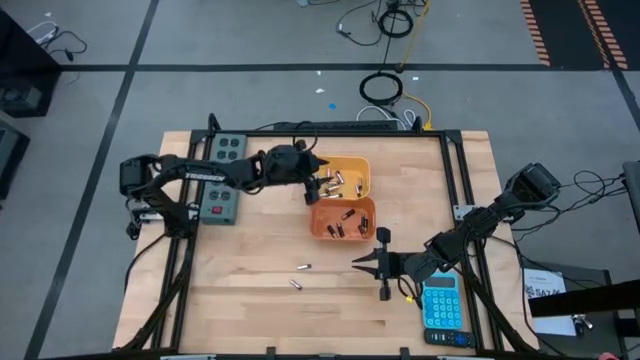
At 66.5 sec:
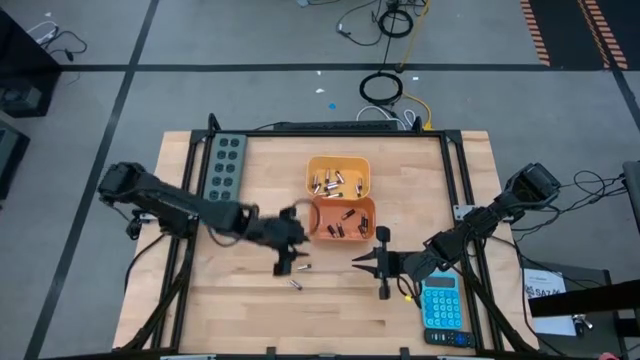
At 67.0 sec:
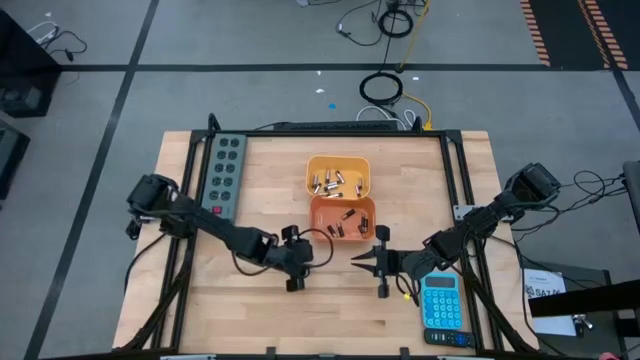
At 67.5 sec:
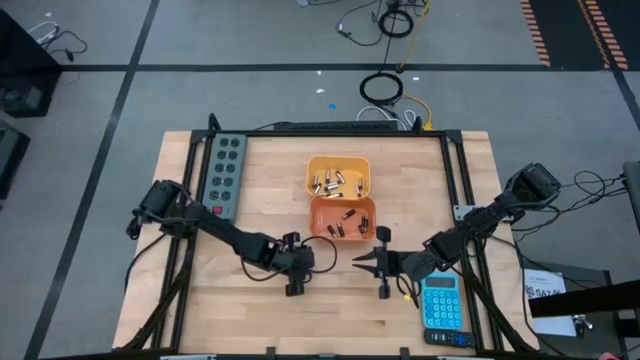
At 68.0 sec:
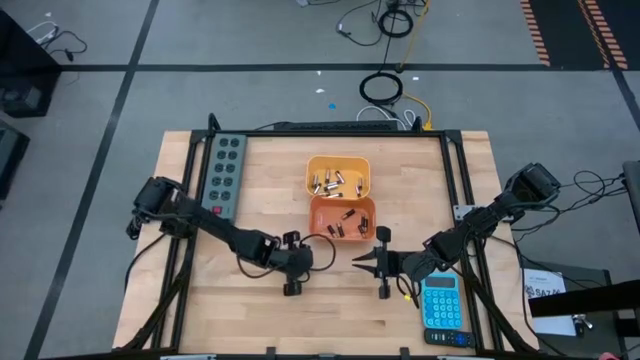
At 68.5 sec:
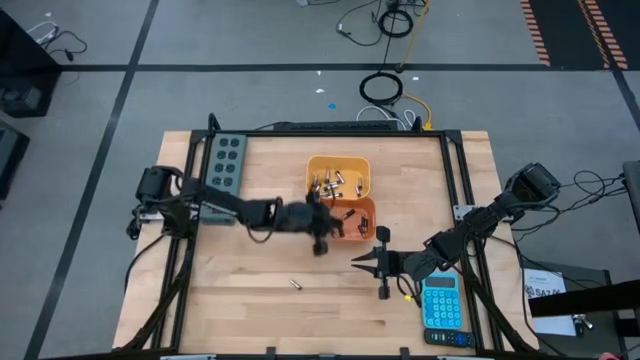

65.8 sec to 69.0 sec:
Task: Sort batteries
Put the silver battery into the yellow bin

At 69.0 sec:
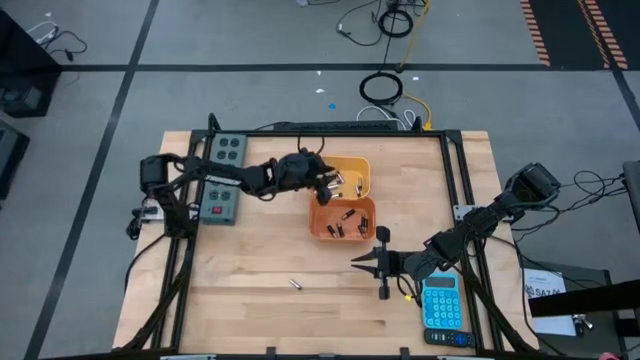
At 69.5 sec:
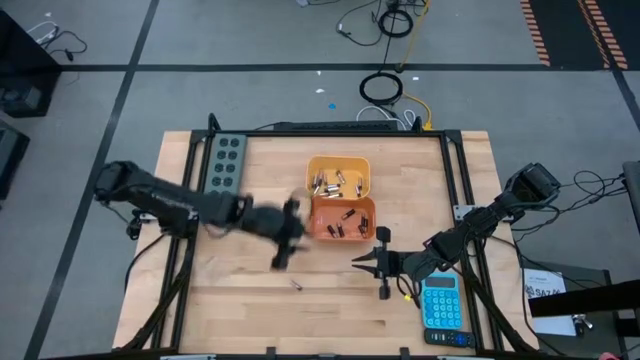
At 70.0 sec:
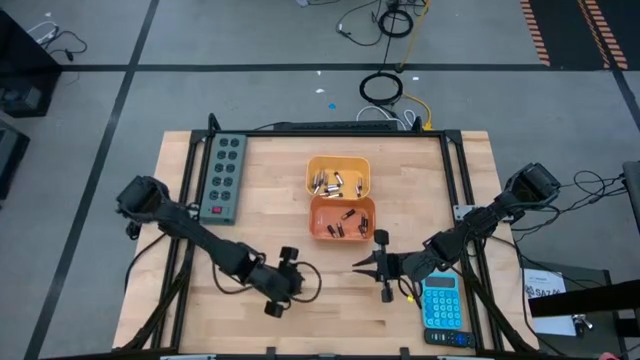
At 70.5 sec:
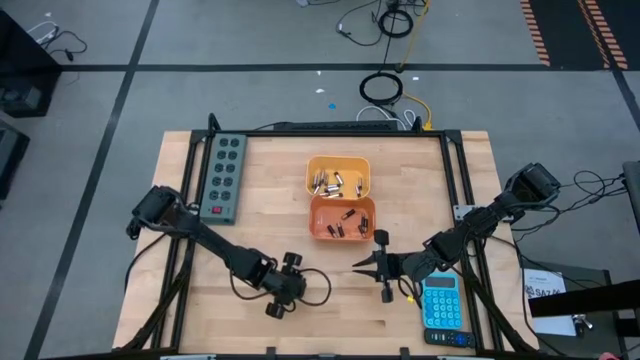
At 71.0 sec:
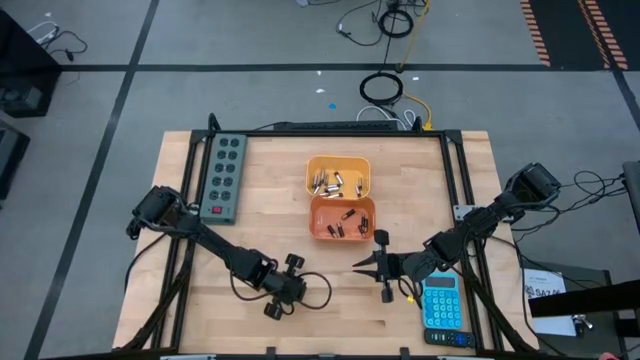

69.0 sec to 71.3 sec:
Put the silver battery into the yellow bin

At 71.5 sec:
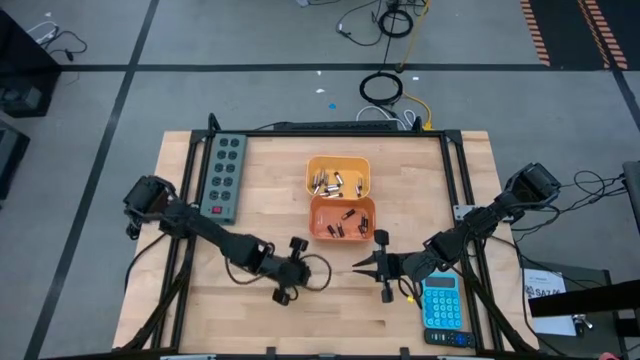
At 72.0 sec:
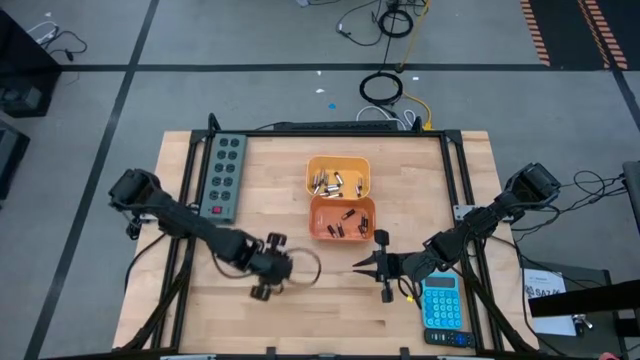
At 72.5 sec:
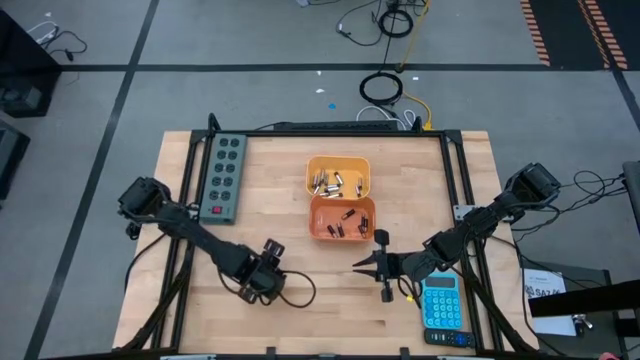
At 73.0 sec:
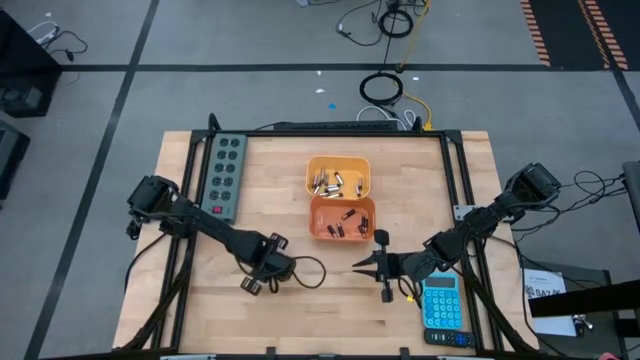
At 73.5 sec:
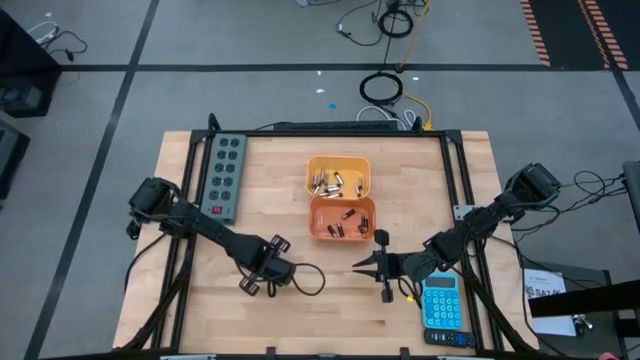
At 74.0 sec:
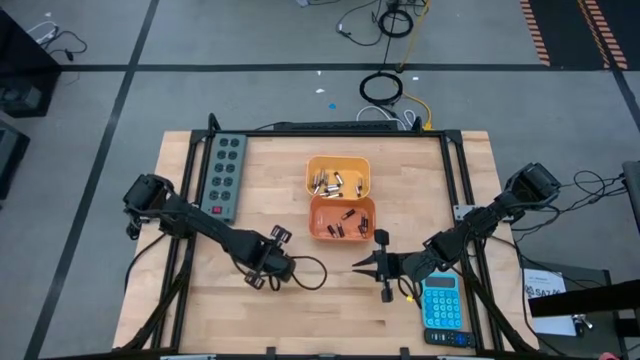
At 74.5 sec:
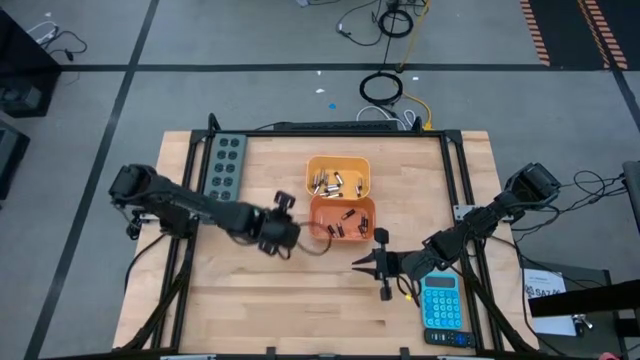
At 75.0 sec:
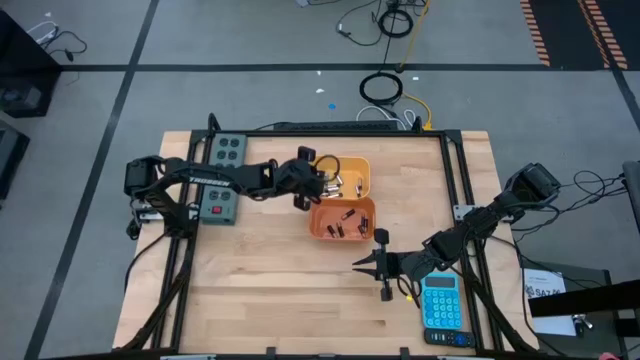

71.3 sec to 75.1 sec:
Put the silver battery into the yellow bin

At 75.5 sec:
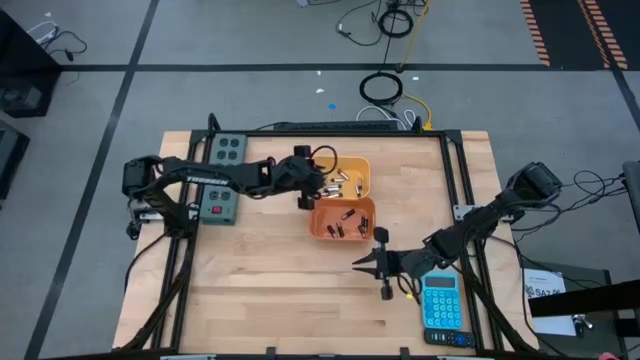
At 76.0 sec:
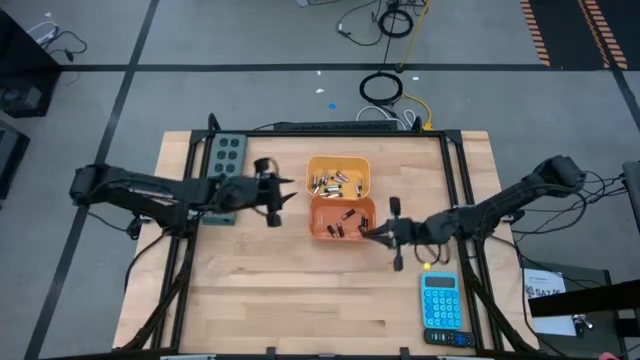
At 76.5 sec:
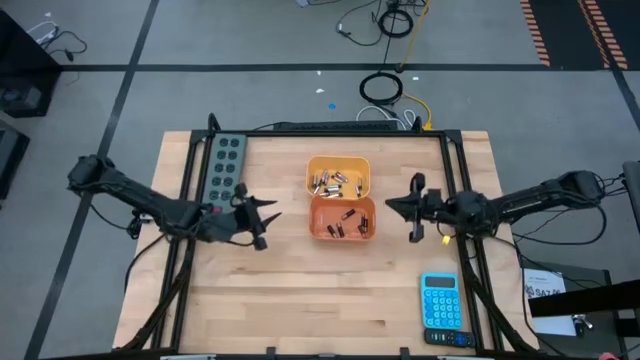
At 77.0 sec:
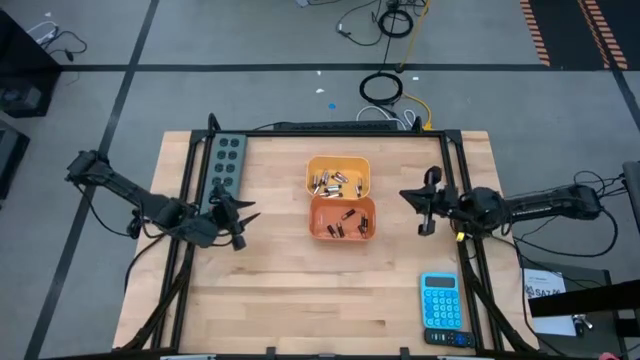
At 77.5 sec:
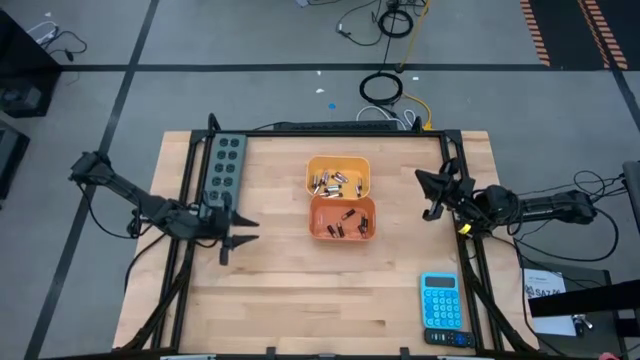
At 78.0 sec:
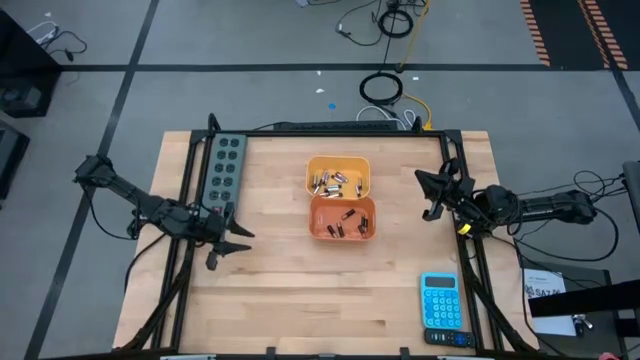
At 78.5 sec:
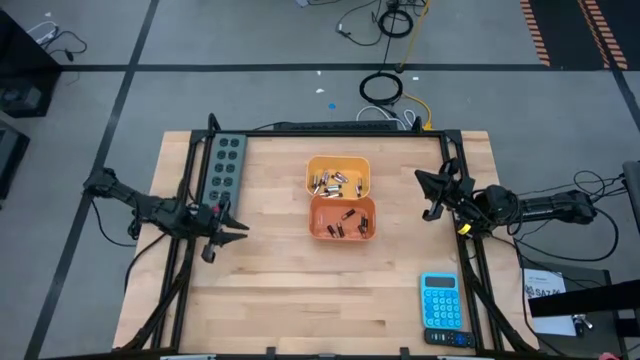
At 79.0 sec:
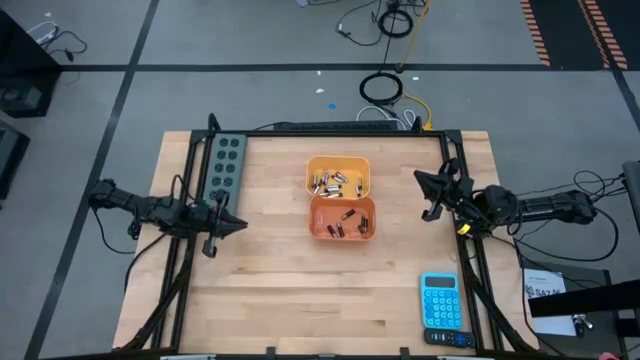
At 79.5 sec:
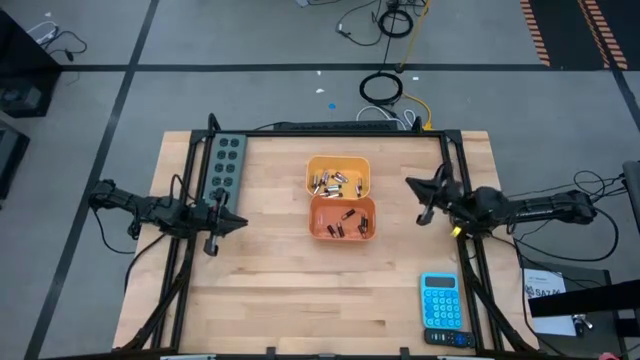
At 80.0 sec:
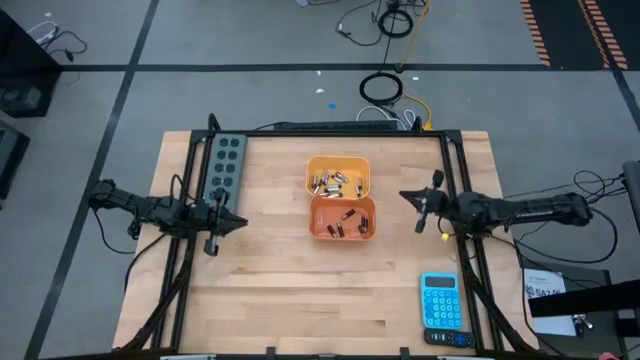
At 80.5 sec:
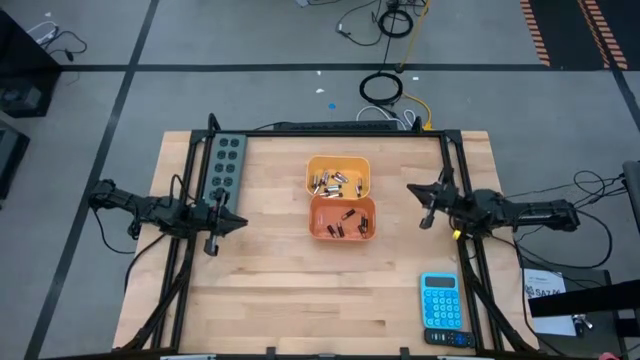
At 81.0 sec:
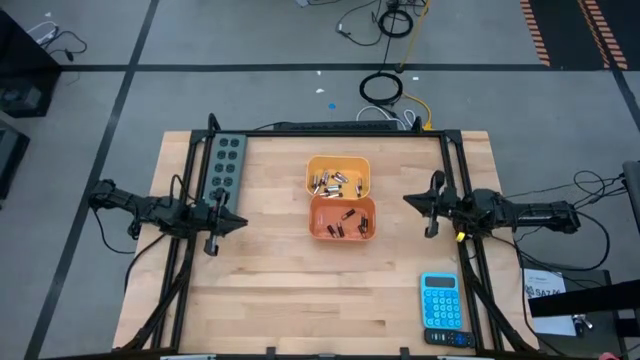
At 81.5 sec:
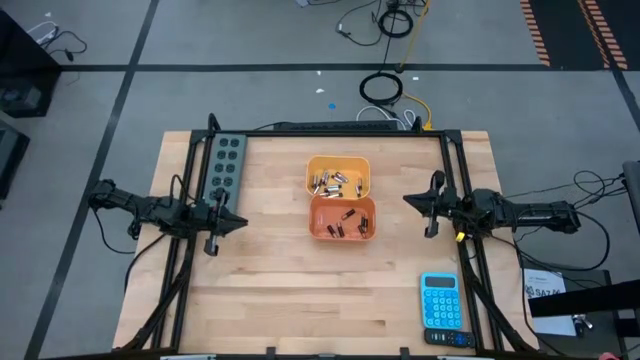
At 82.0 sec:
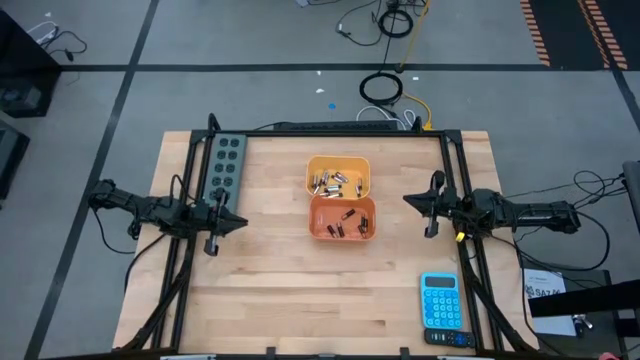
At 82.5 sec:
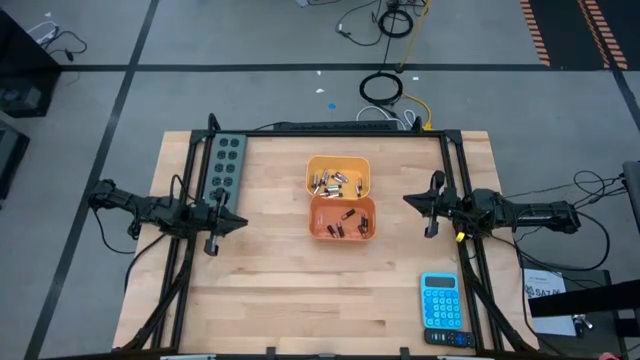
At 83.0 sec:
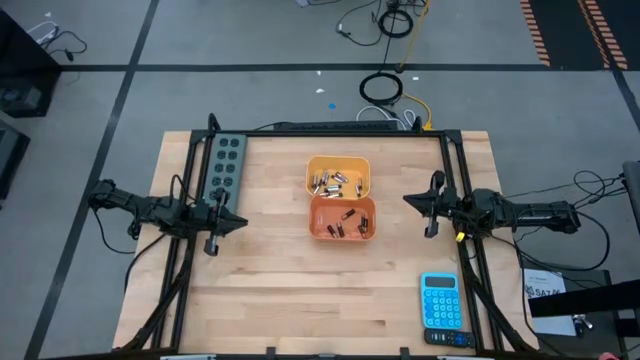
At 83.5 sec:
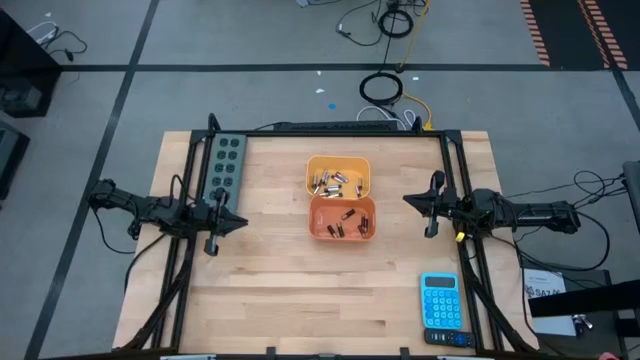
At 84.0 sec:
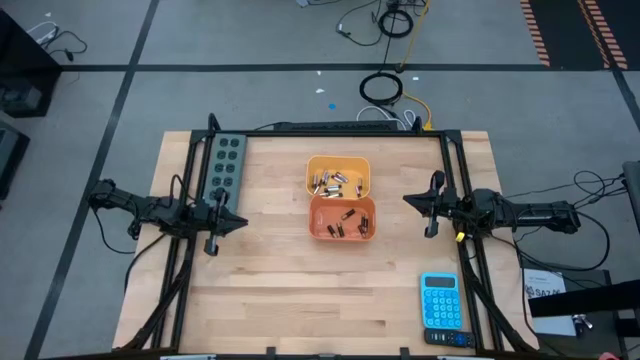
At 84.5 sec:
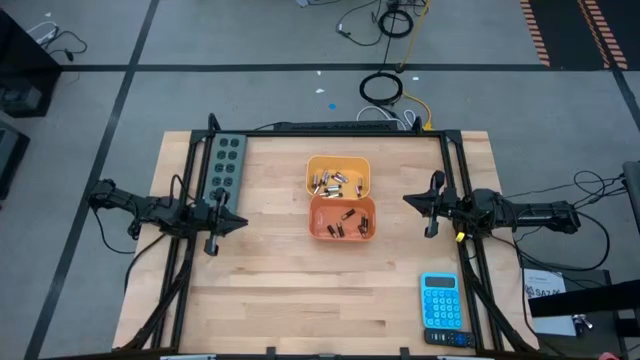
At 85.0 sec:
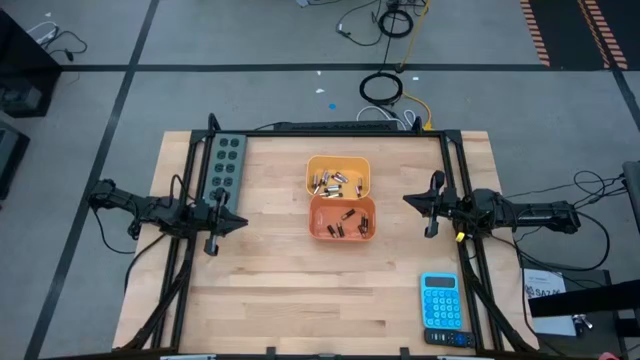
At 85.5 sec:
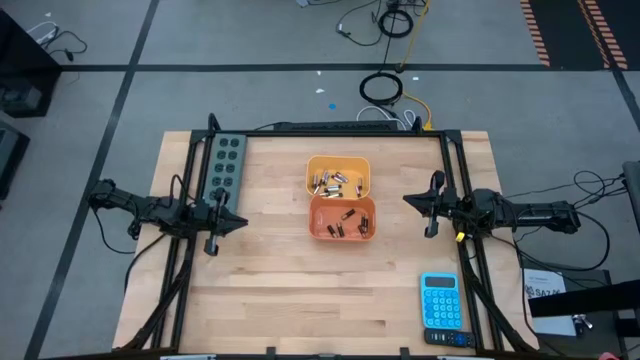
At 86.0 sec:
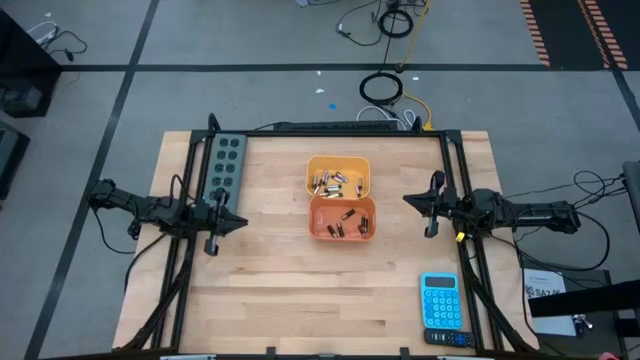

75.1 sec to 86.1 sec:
Return to Home Position
